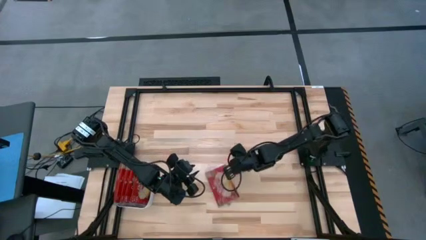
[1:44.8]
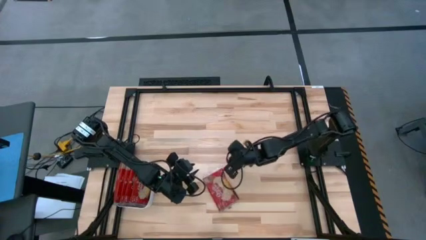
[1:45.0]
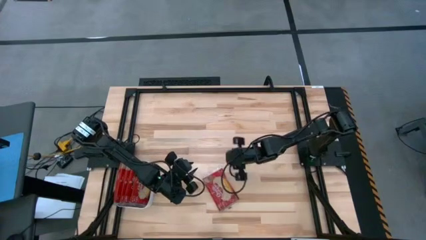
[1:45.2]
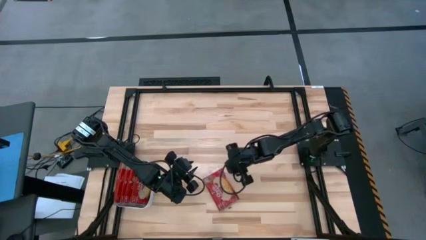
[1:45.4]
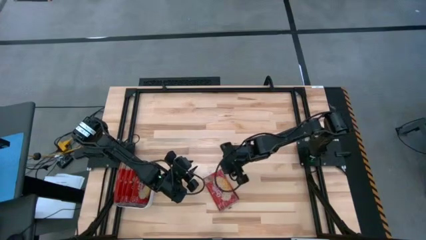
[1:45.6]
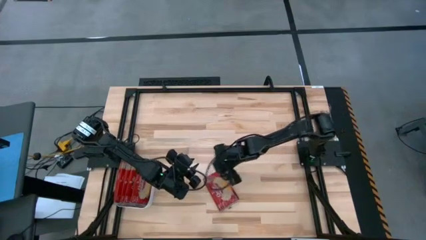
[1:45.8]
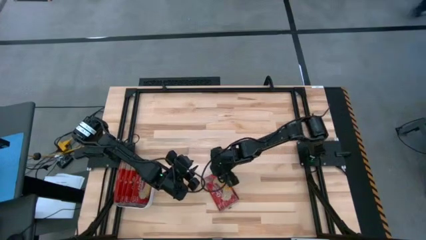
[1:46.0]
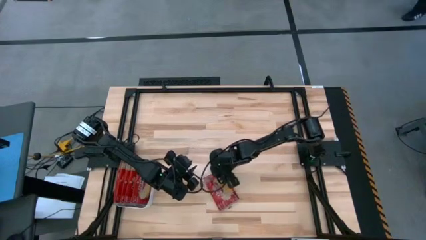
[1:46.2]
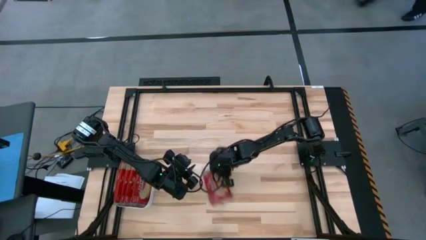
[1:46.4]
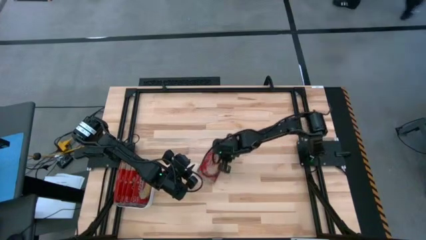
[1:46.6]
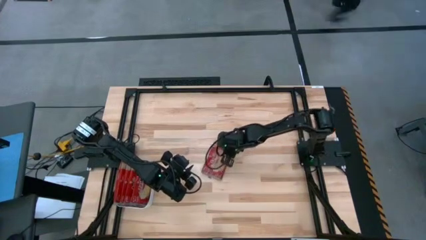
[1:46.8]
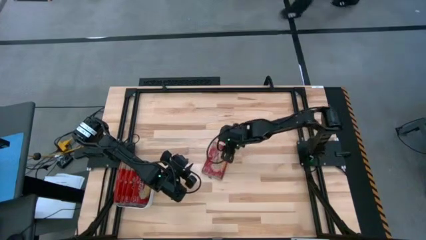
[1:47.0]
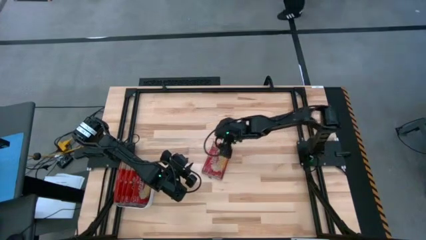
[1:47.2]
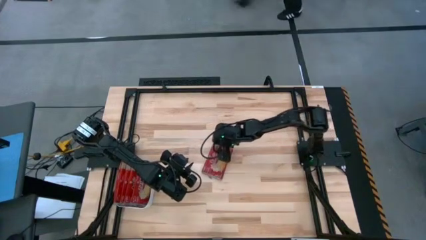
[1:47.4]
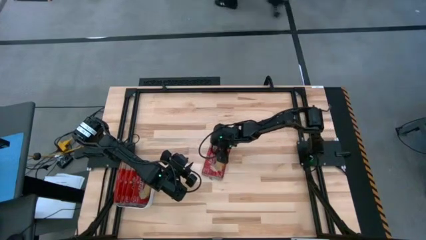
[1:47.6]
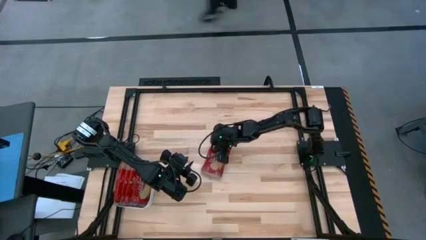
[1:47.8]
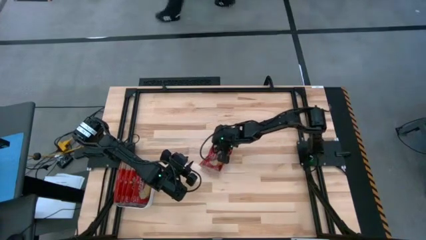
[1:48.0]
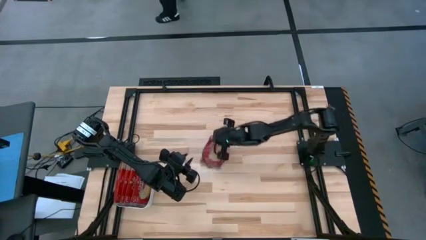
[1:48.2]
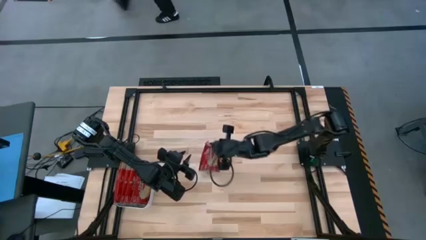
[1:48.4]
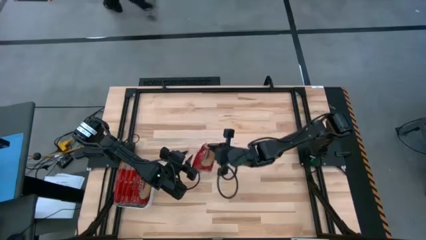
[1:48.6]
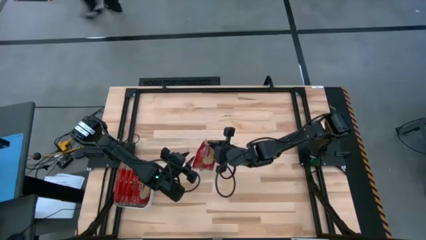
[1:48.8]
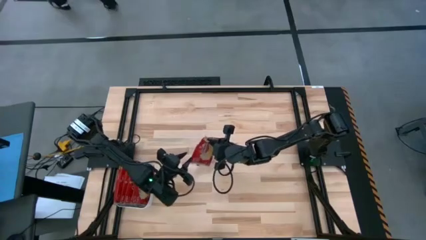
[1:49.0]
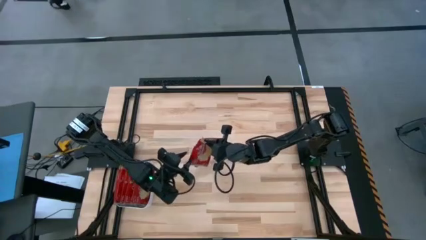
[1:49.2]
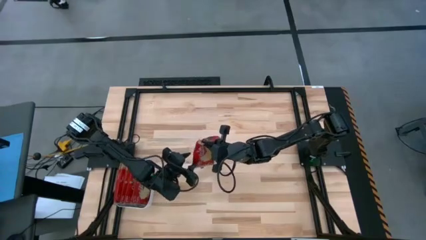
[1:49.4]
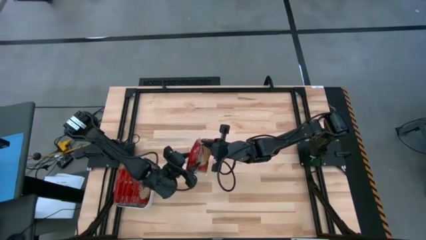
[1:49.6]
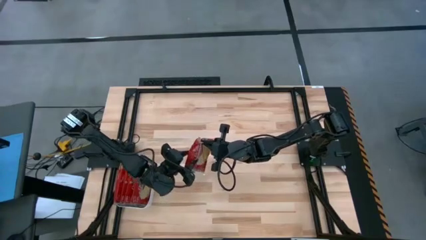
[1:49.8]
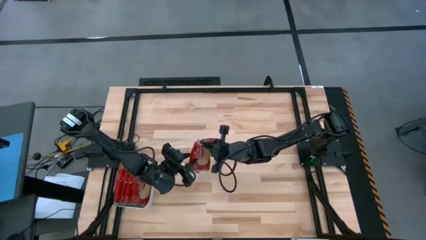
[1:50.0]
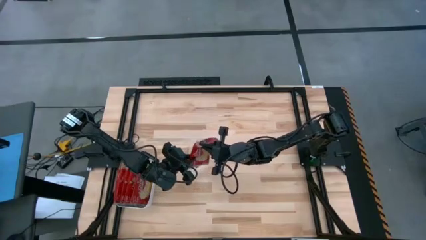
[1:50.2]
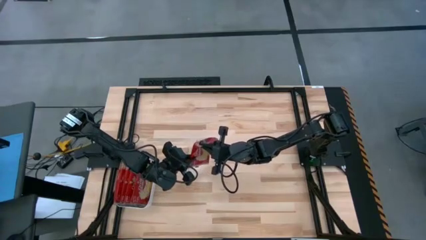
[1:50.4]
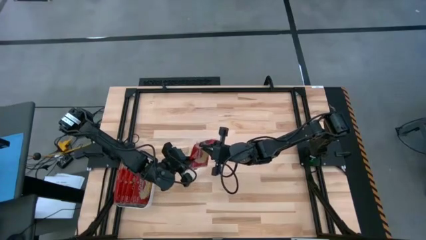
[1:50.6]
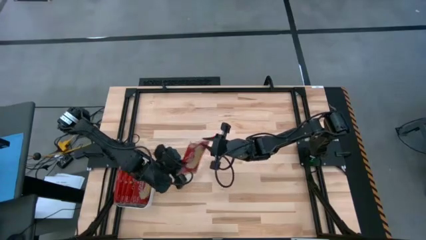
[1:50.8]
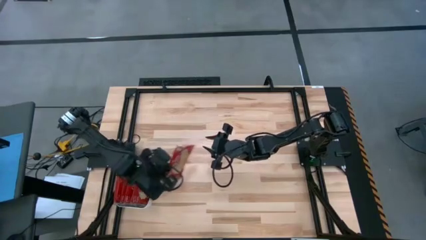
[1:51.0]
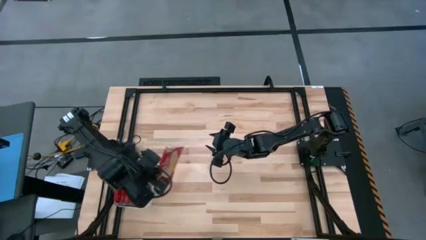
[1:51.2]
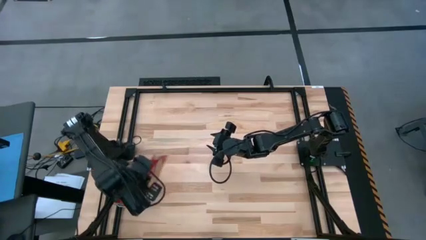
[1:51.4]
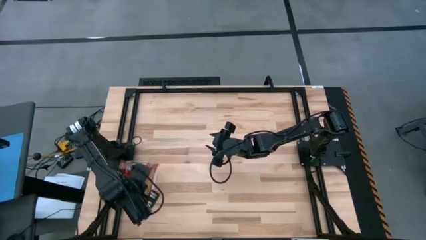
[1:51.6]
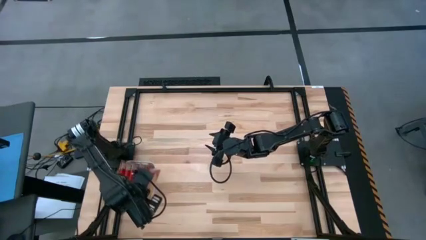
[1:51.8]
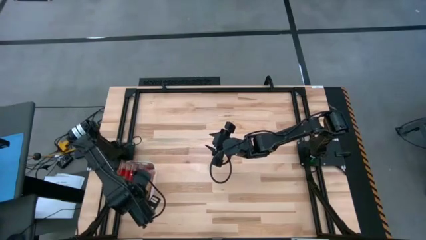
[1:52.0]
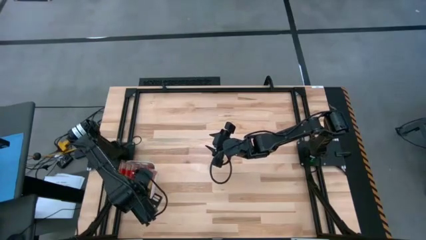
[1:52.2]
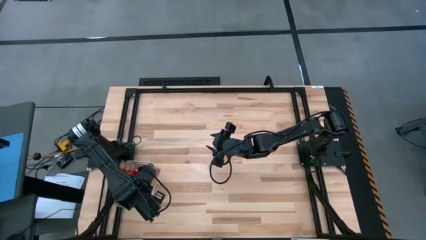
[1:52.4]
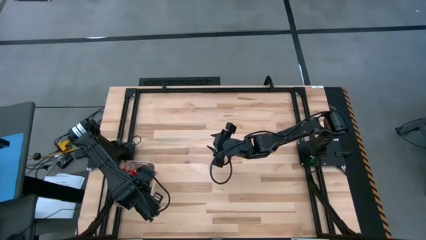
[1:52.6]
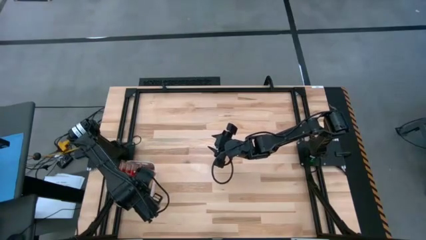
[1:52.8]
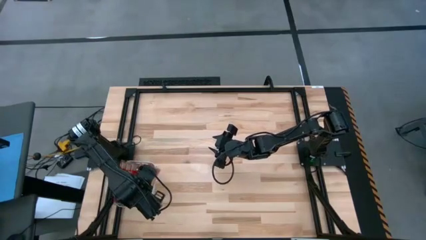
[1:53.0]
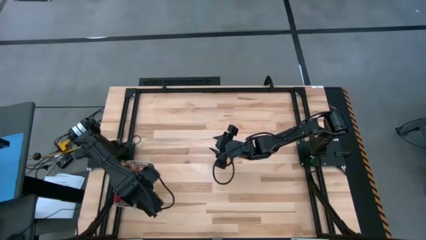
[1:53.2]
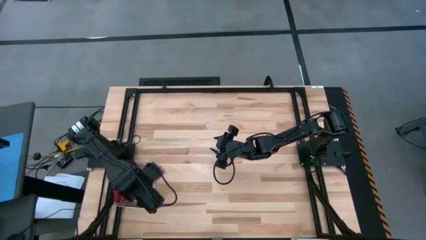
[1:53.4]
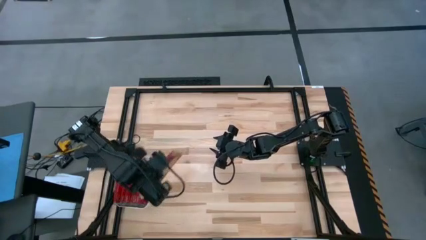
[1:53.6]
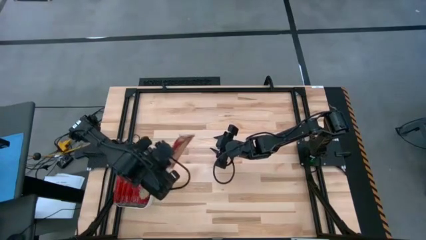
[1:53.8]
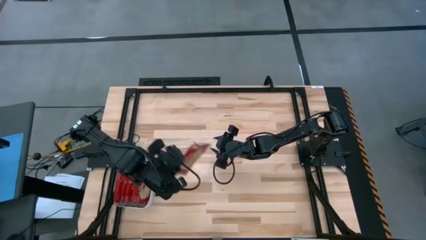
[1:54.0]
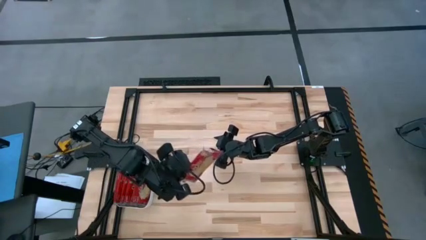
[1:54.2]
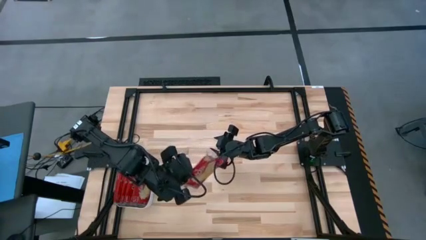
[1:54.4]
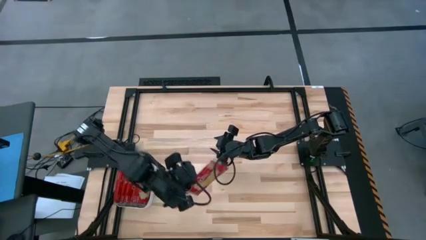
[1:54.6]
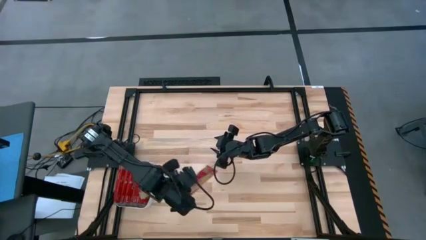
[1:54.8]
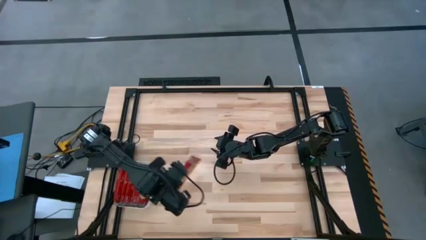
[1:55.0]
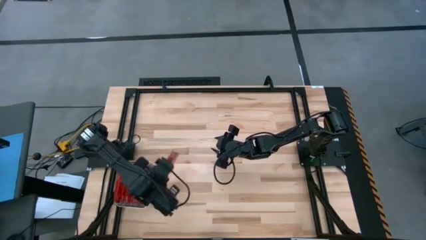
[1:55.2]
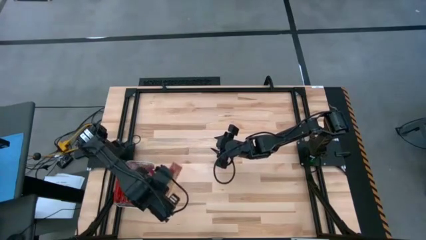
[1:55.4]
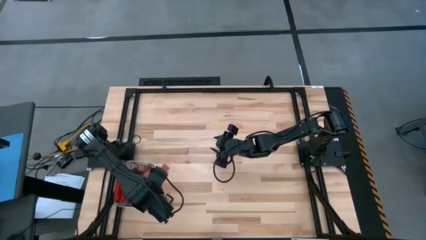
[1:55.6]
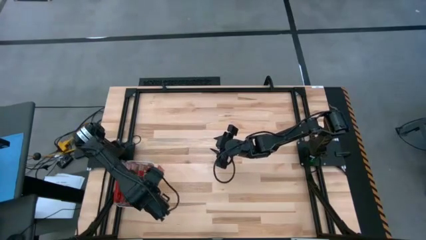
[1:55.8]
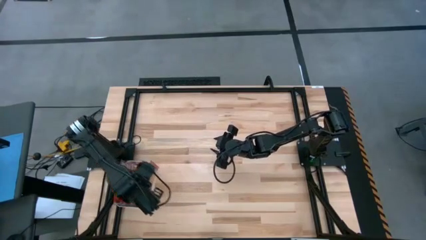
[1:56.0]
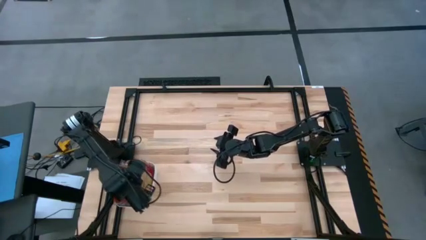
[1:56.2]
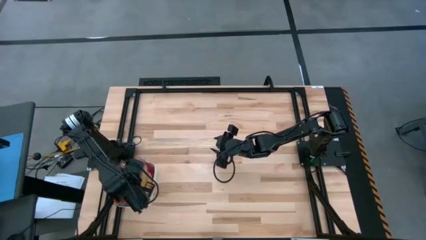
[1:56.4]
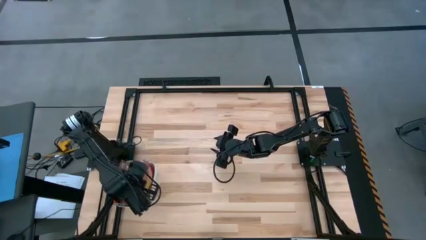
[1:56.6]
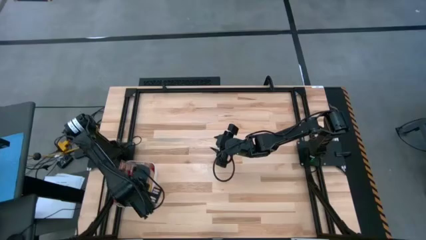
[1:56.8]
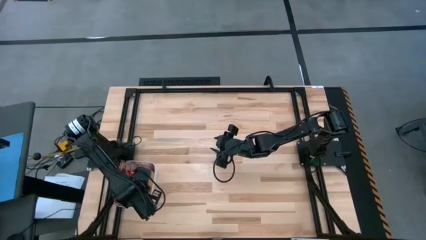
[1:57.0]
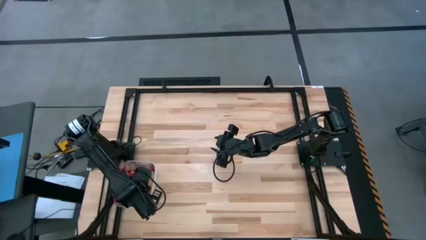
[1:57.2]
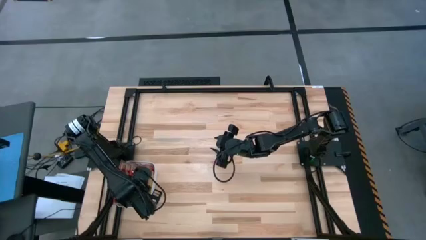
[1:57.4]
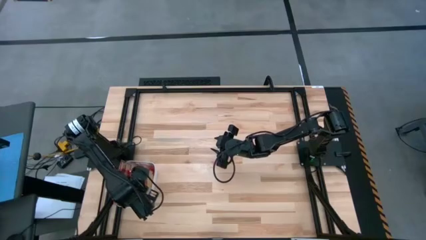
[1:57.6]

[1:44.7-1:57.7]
Task: Sort popcorn bags into baskets
Put the red popcorn bag into the white bin

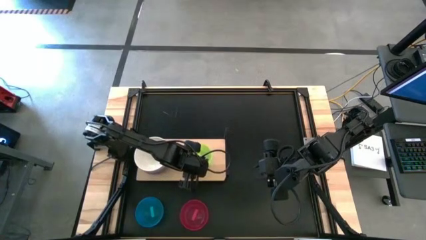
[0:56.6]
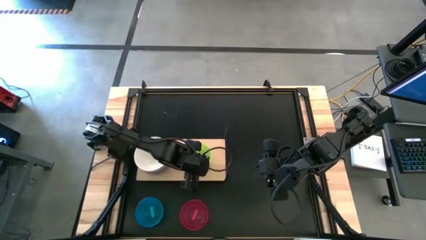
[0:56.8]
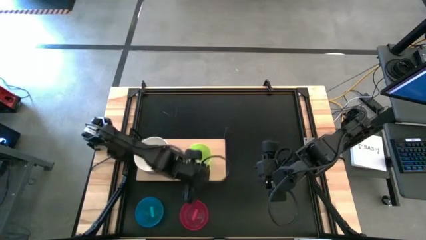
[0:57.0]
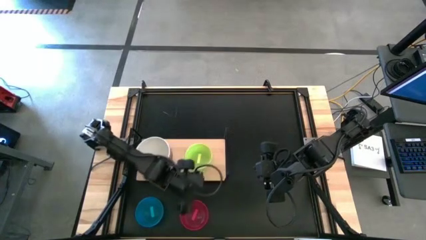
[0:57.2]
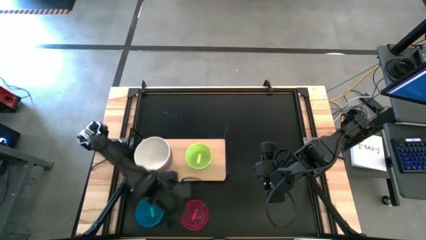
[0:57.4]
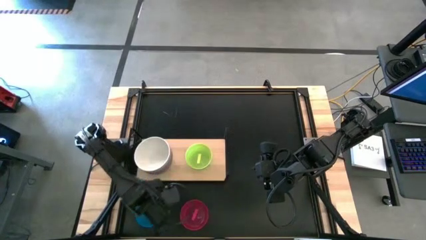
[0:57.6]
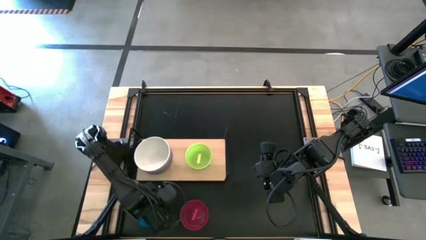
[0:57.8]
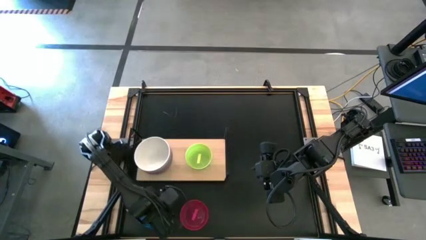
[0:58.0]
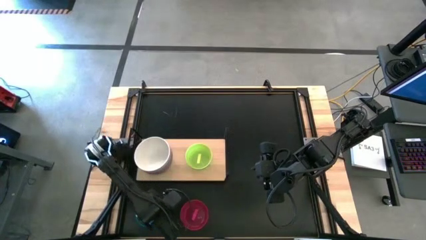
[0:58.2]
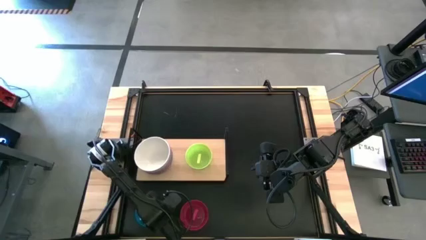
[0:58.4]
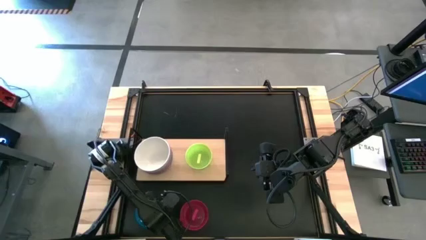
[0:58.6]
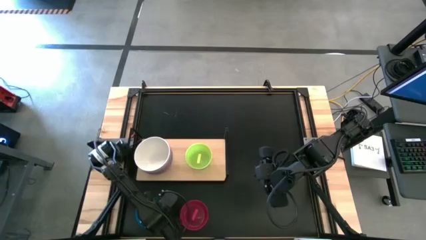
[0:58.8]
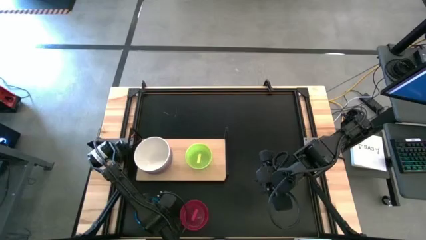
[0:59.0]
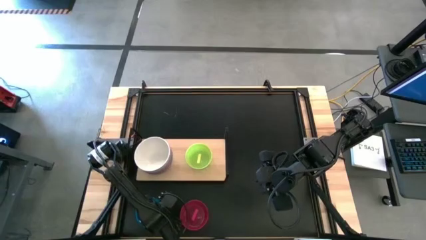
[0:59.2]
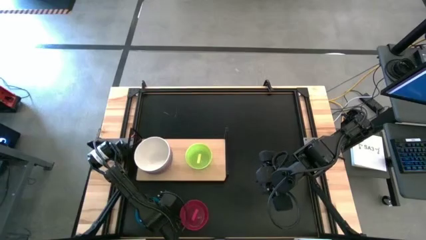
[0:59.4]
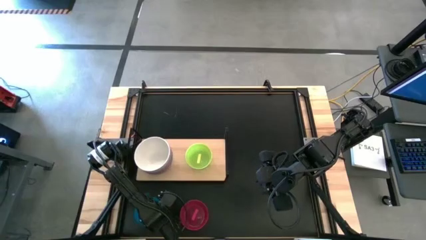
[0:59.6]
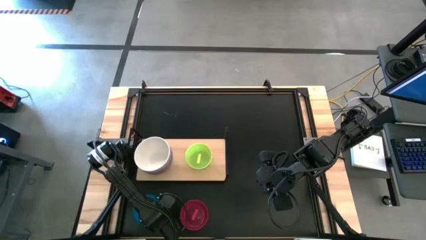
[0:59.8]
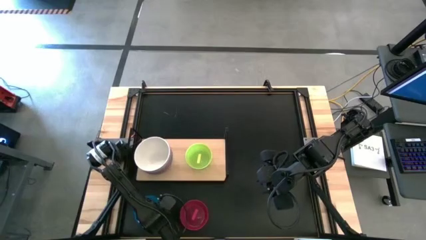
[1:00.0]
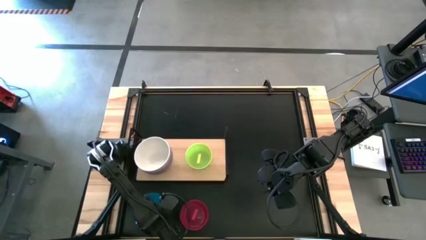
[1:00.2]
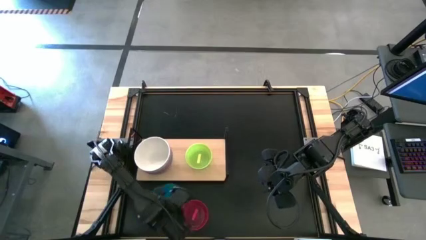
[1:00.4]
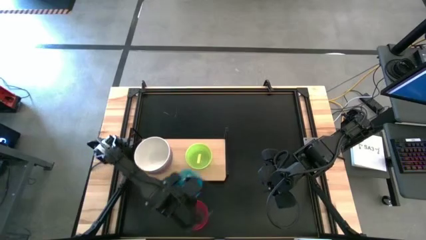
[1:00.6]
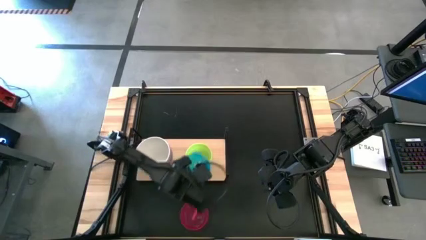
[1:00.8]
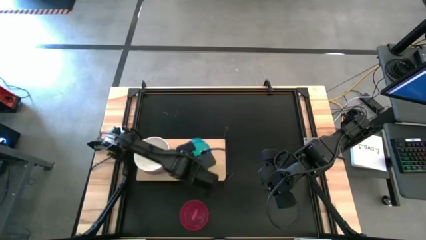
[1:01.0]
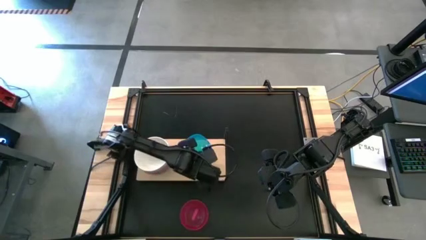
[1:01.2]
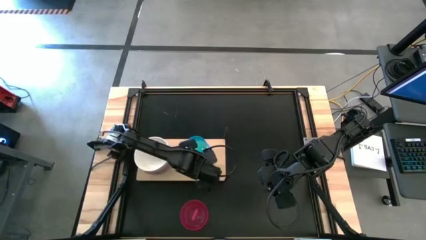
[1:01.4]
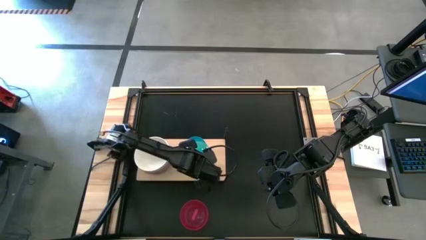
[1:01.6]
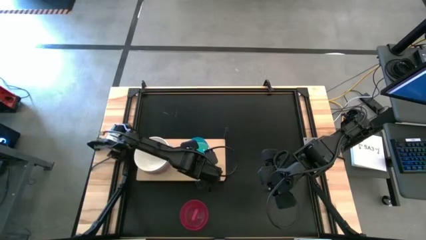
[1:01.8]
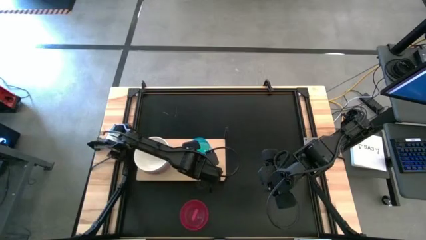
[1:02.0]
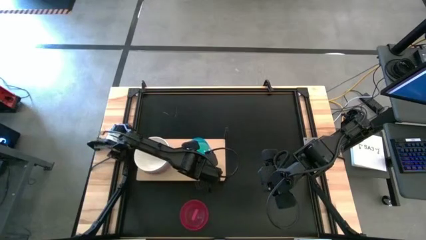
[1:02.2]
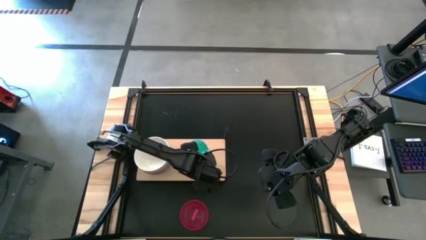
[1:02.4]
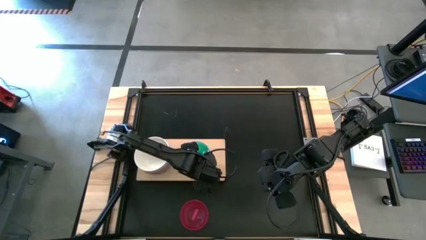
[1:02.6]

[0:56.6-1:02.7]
Task: Place and stack bowls onto a shelf
Stack the blue bowl on top of the green bowl on the shelf
